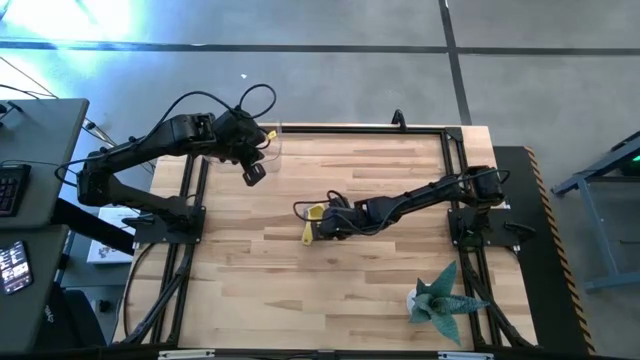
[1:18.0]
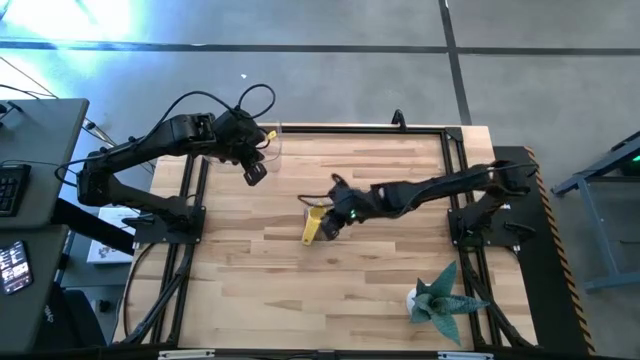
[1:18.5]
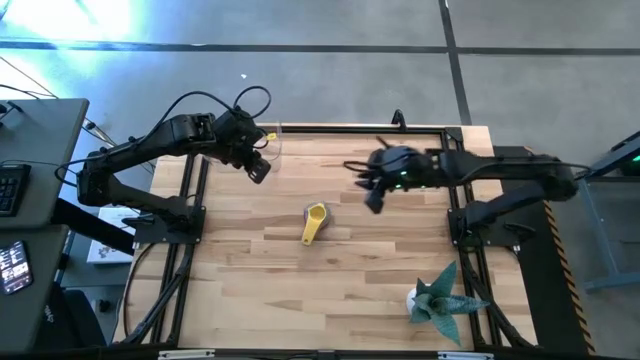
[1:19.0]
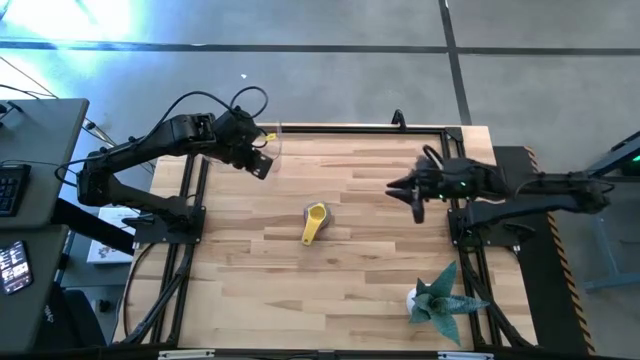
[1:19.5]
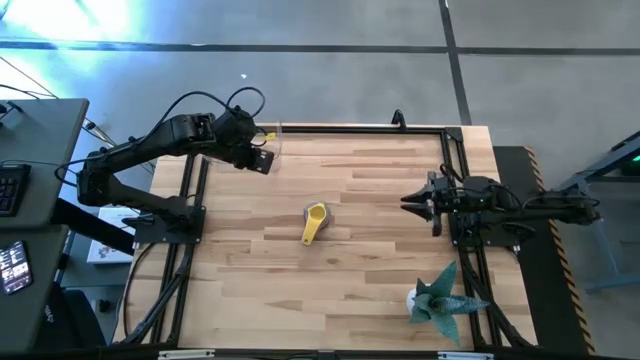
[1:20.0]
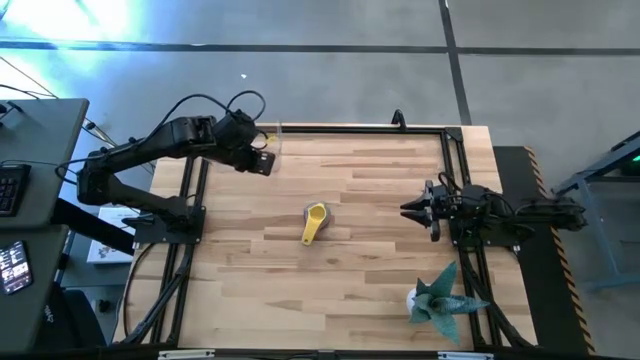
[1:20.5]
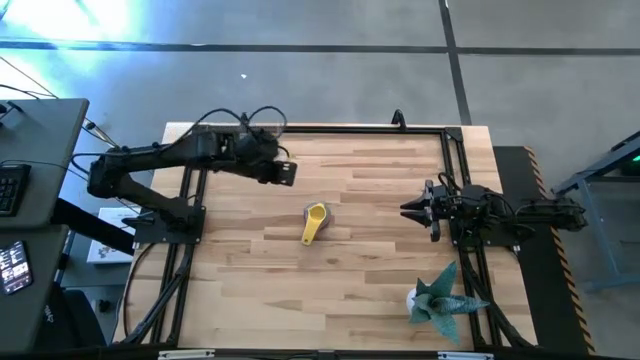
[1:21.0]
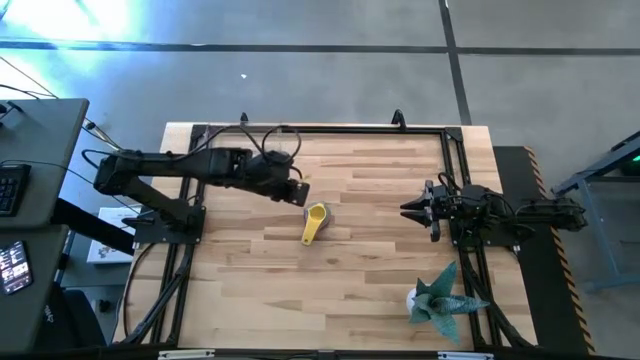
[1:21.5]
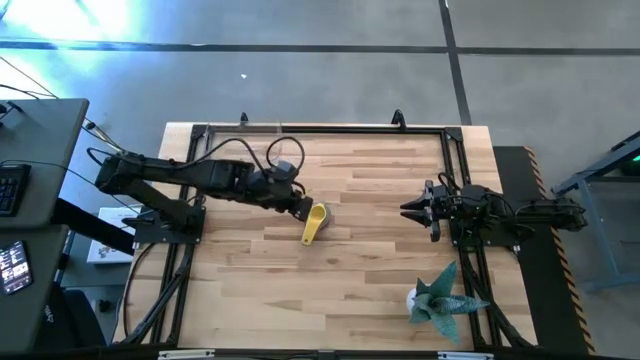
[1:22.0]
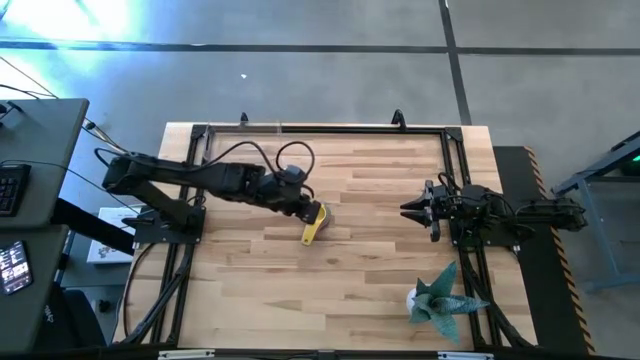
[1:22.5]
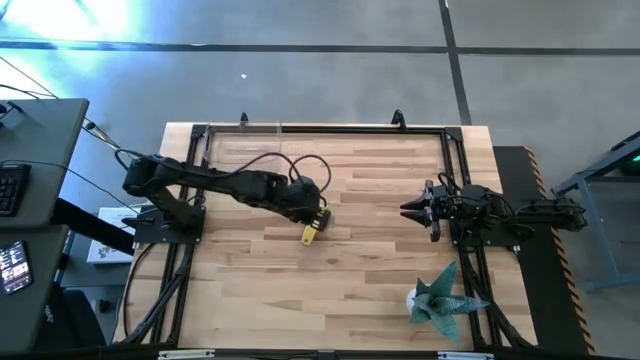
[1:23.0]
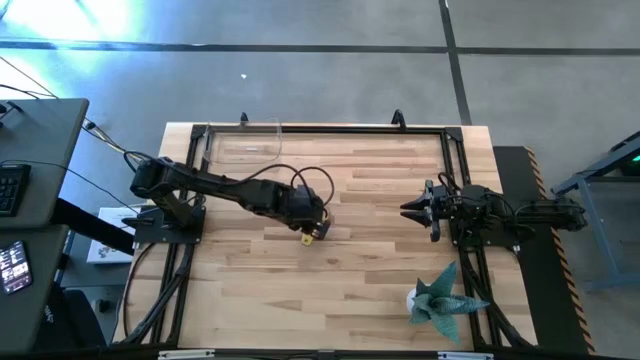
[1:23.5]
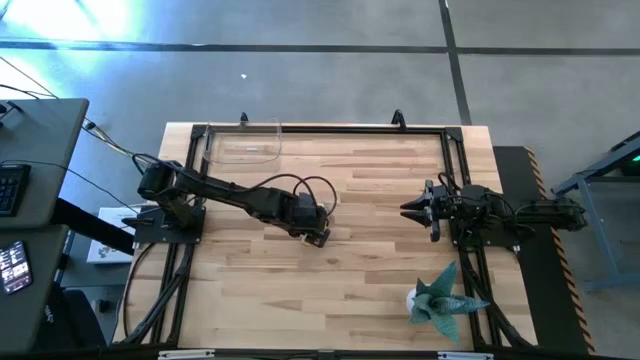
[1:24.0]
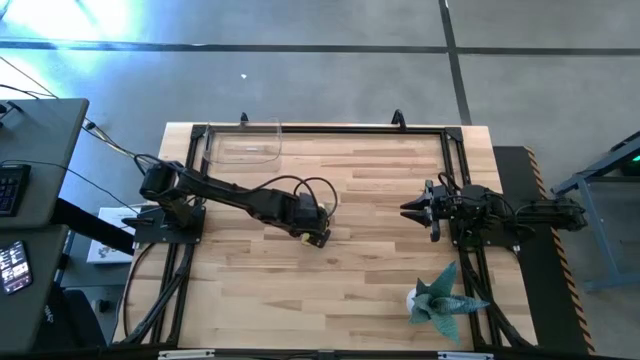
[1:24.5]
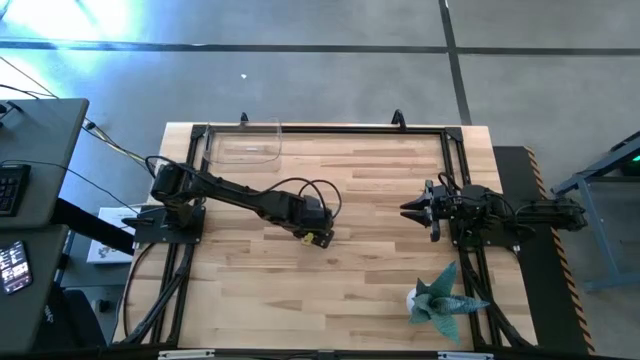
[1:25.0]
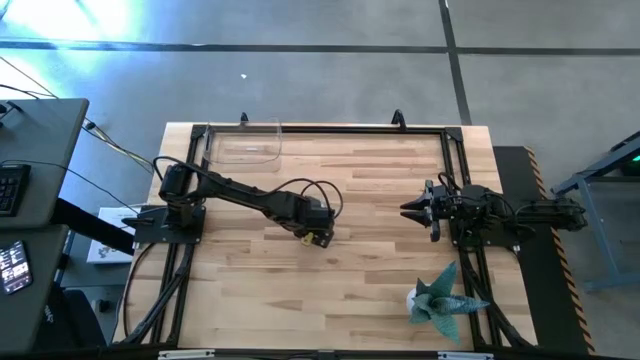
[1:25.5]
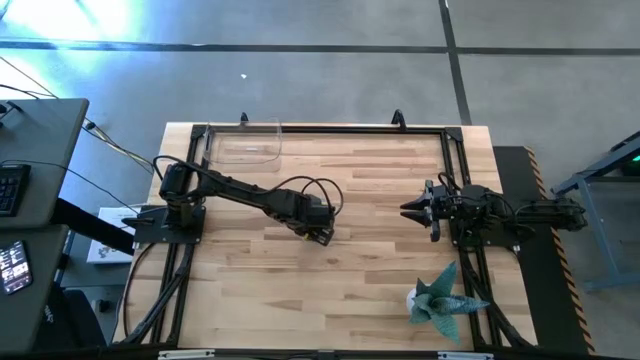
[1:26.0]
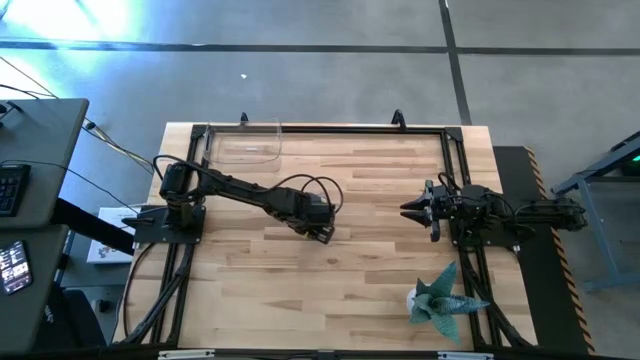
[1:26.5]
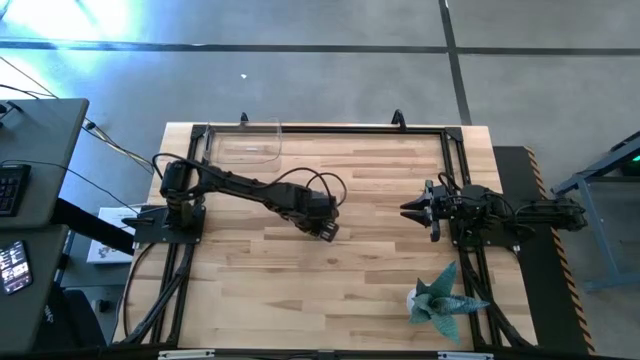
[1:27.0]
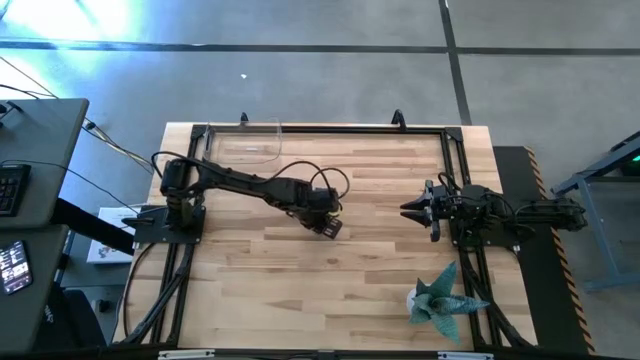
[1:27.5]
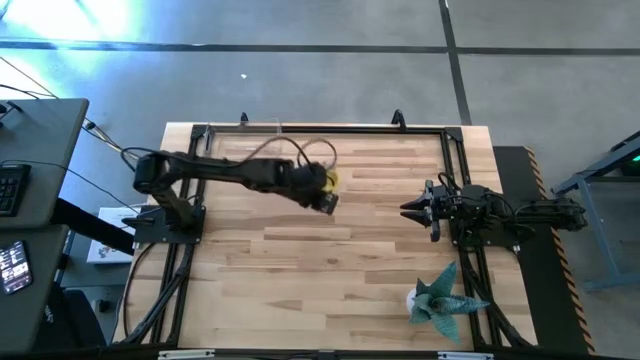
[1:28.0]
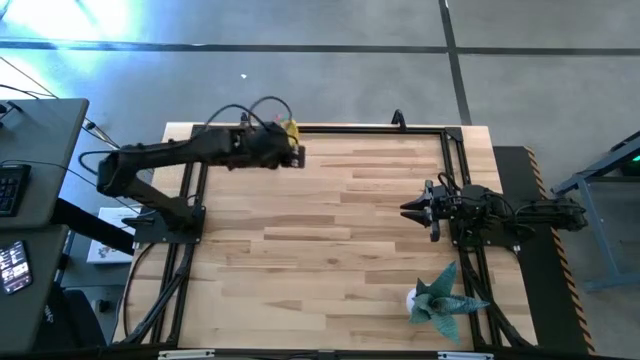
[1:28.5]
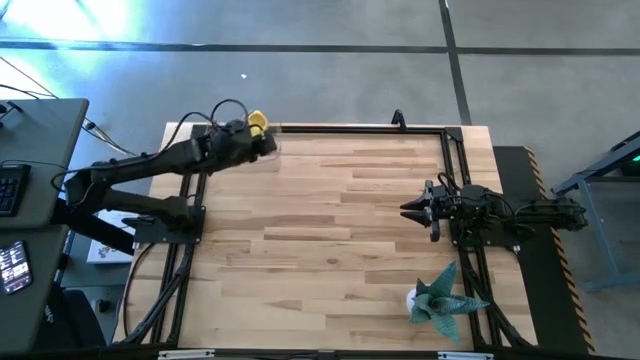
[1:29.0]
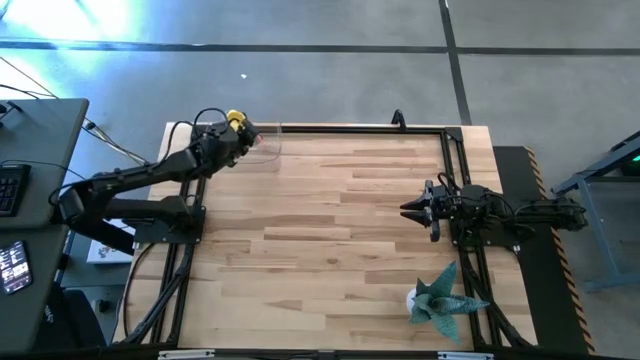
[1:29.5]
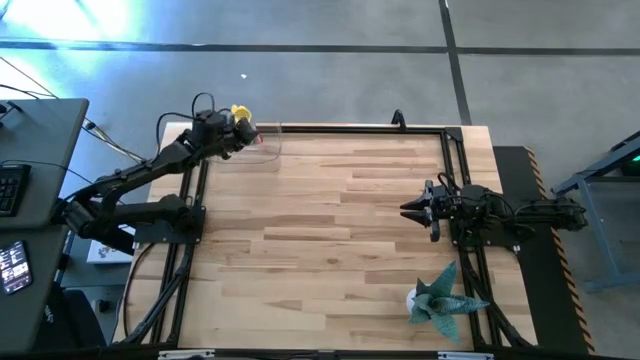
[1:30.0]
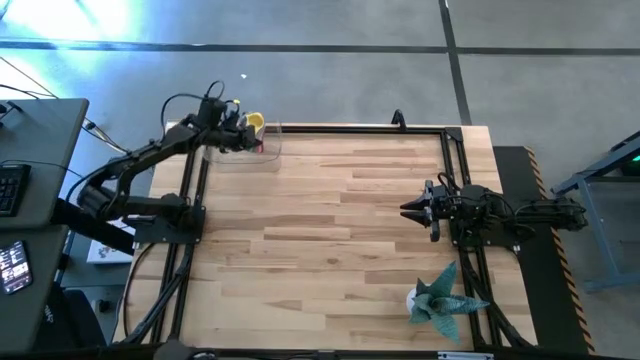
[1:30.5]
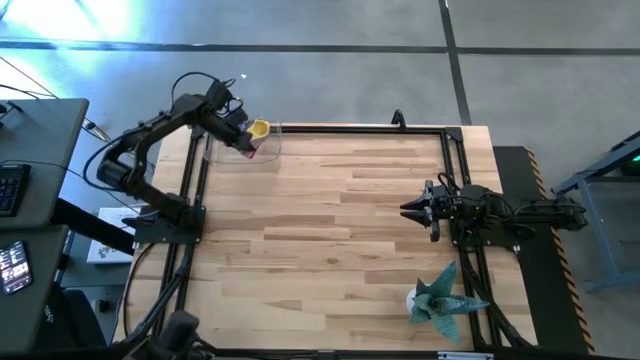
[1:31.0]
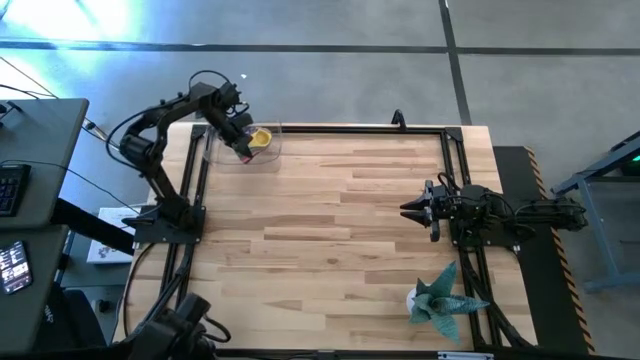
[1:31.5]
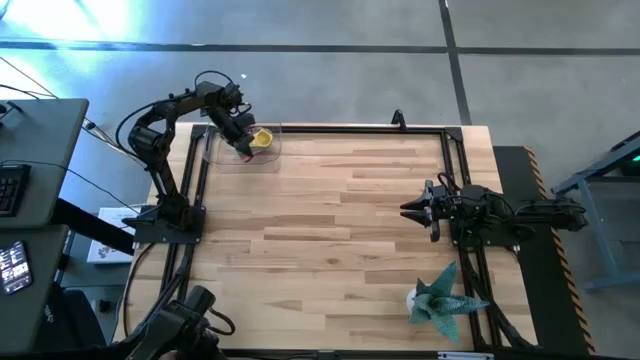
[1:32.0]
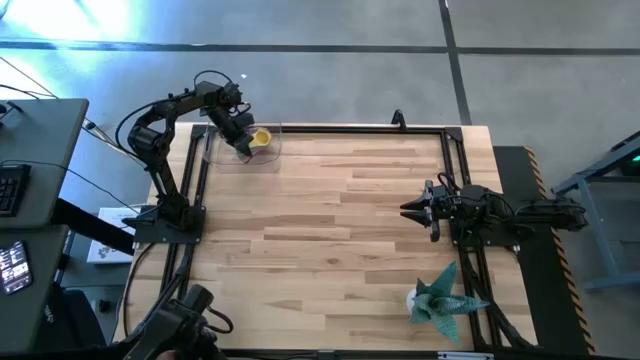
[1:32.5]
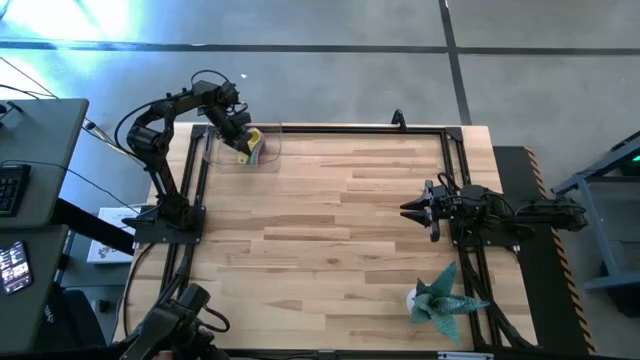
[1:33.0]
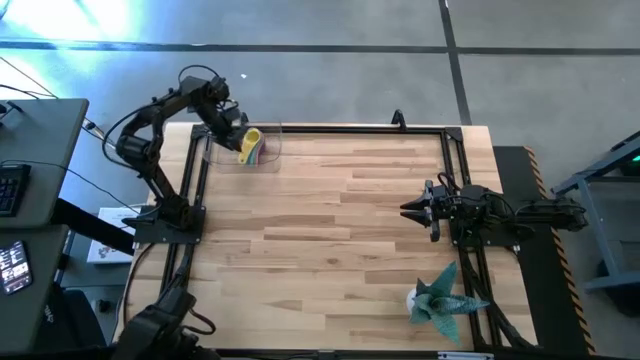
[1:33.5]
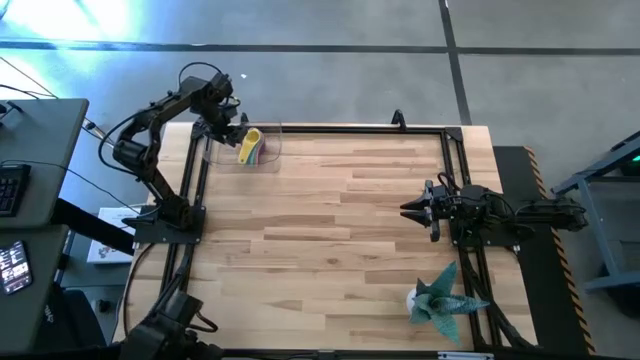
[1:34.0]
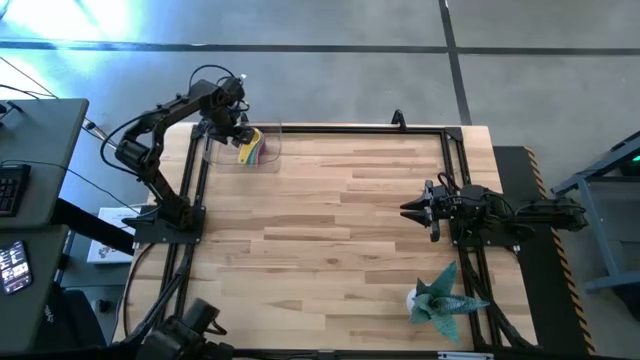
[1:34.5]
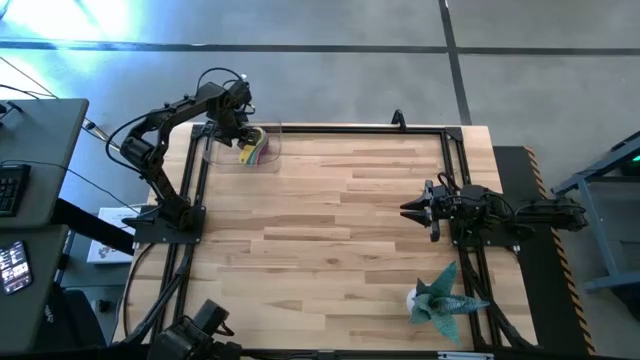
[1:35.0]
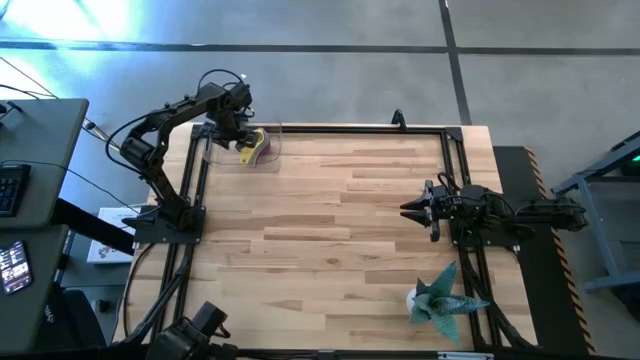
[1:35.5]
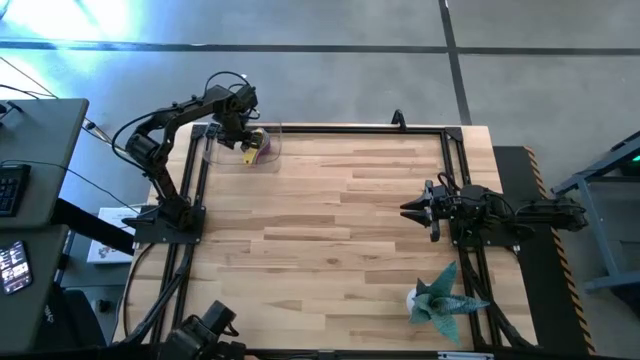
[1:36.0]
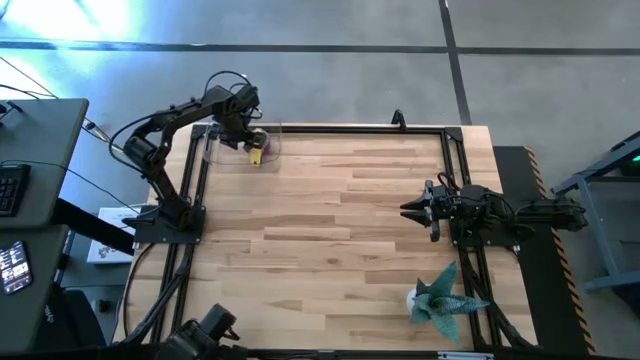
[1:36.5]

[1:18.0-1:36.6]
Task: Nest measuring cups in basket
Put the stacked measuring cups into the transparent bin

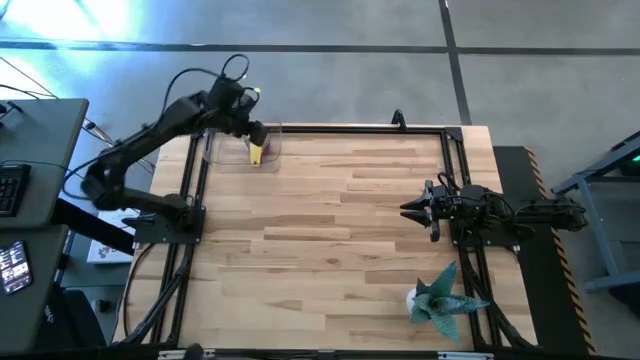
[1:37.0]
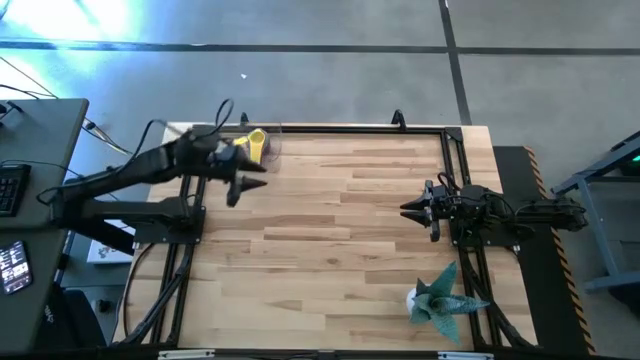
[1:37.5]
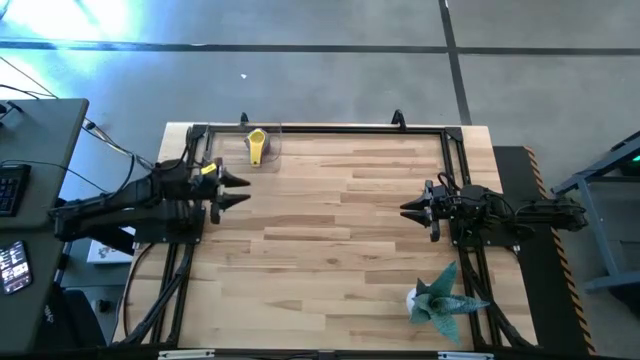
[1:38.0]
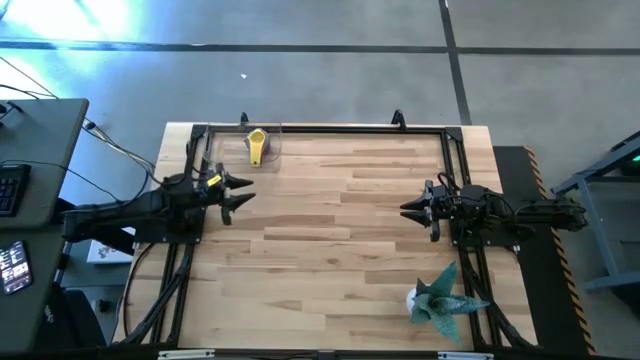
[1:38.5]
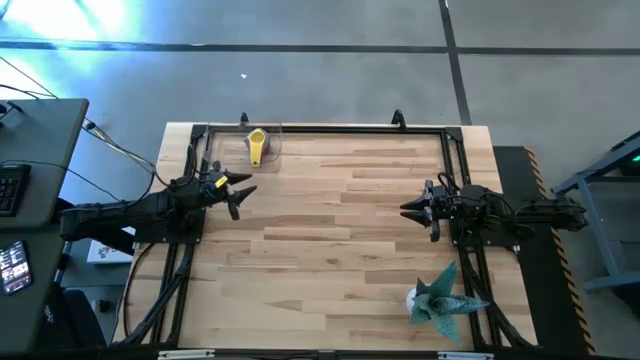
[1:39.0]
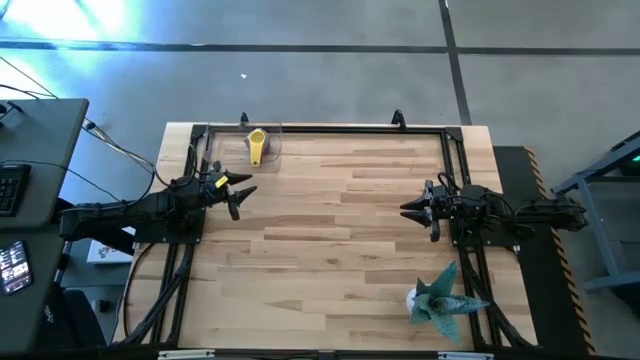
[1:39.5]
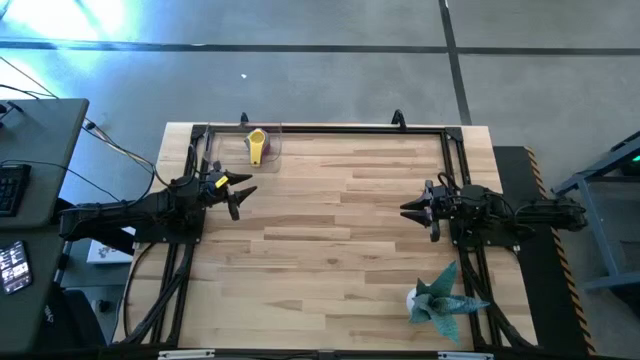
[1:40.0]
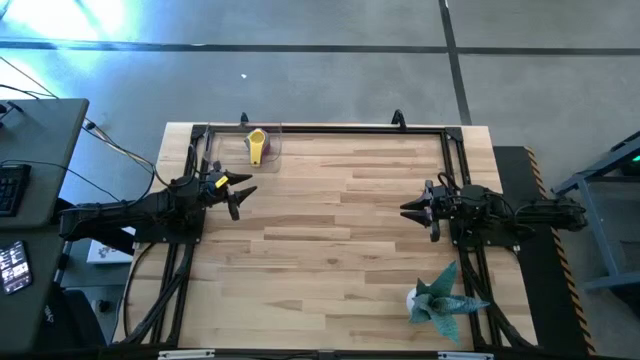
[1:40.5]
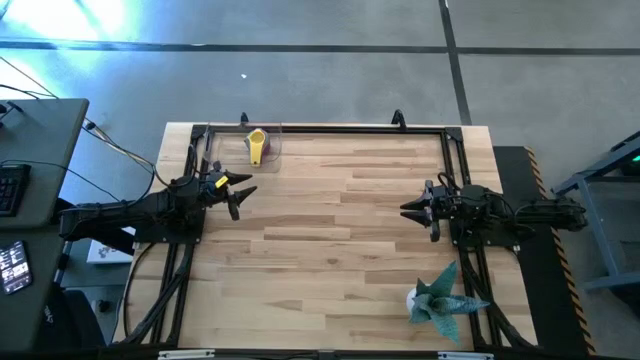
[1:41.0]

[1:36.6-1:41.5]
Return to Home Position
